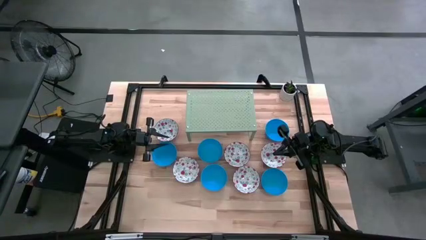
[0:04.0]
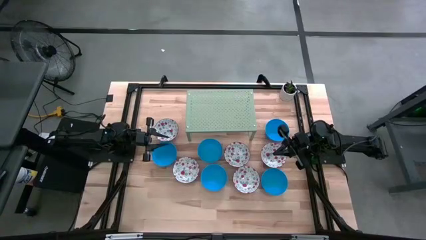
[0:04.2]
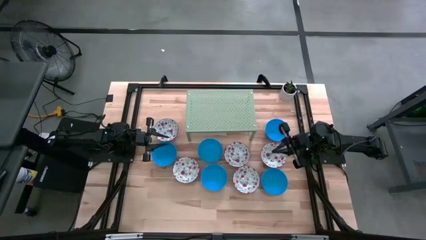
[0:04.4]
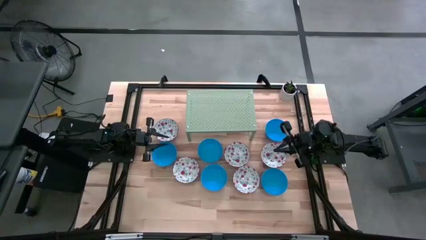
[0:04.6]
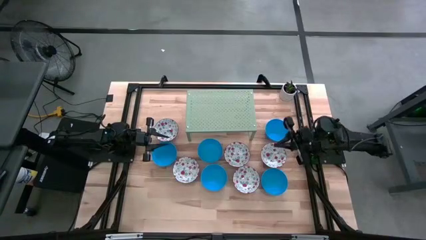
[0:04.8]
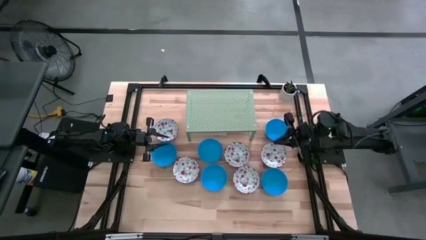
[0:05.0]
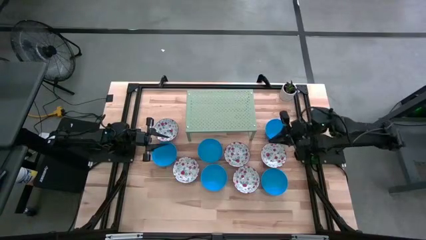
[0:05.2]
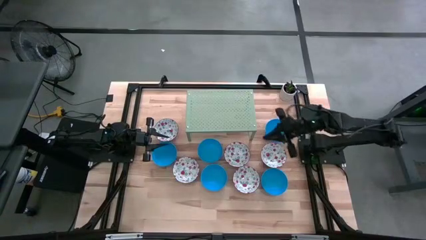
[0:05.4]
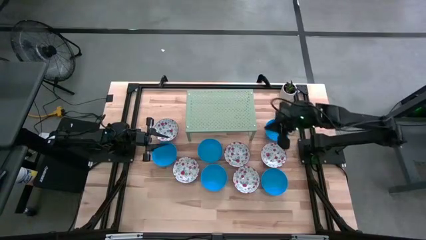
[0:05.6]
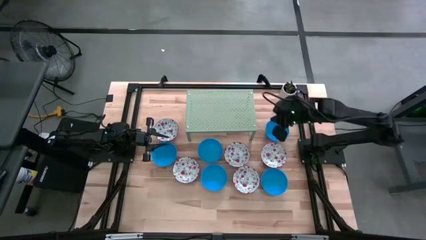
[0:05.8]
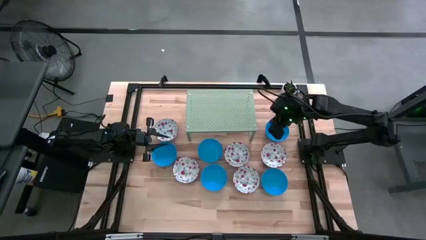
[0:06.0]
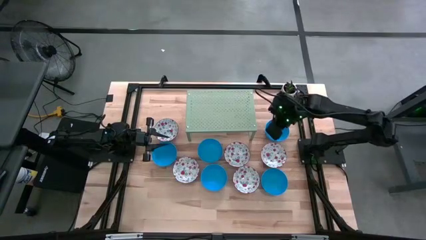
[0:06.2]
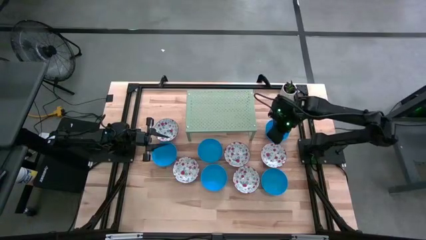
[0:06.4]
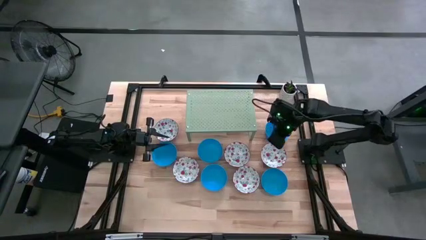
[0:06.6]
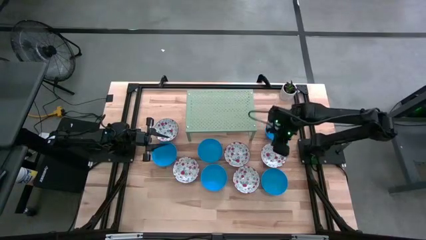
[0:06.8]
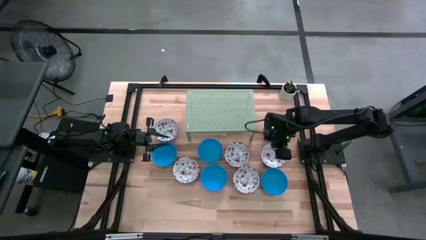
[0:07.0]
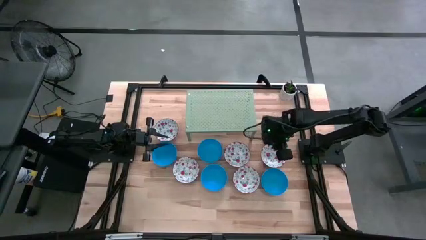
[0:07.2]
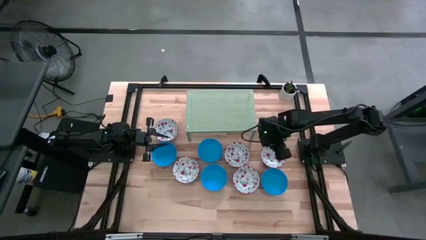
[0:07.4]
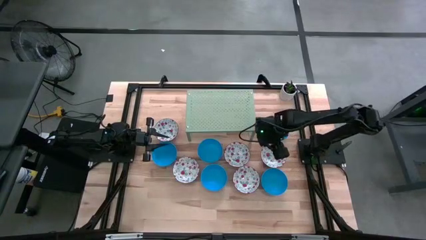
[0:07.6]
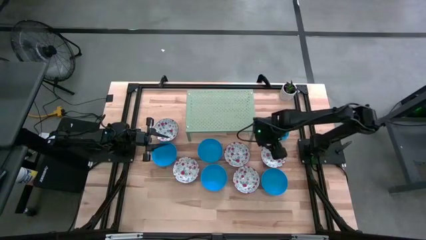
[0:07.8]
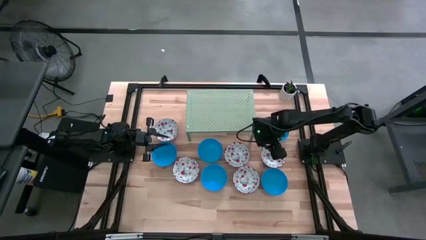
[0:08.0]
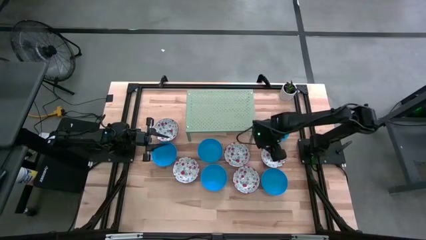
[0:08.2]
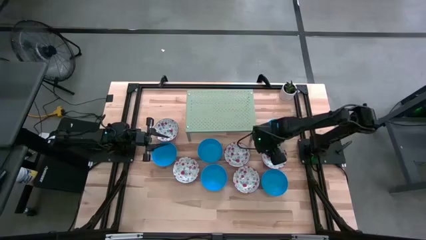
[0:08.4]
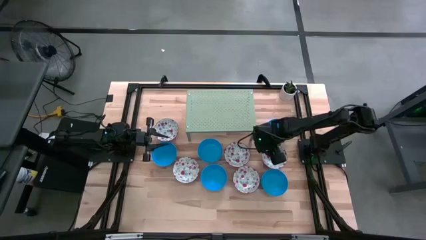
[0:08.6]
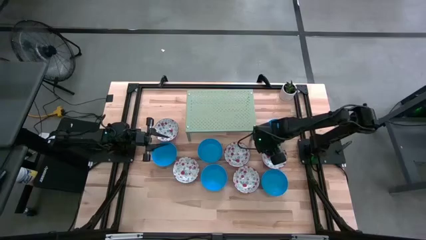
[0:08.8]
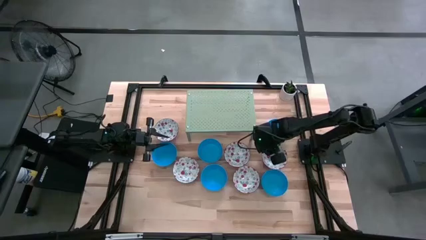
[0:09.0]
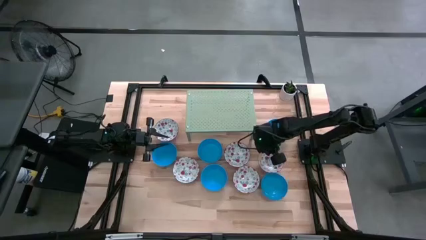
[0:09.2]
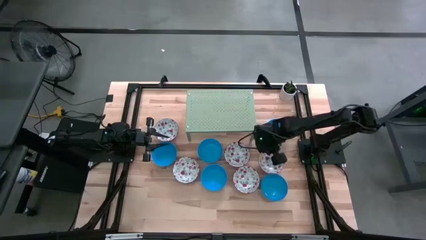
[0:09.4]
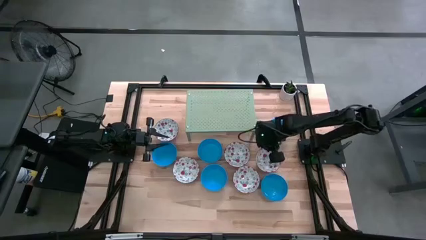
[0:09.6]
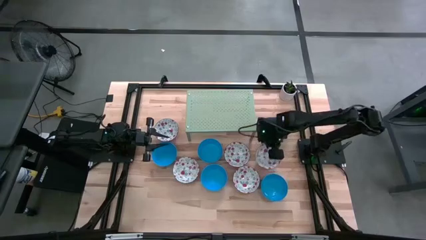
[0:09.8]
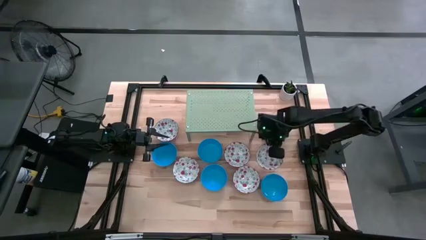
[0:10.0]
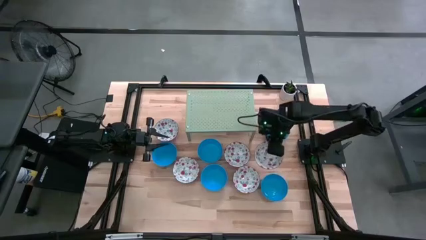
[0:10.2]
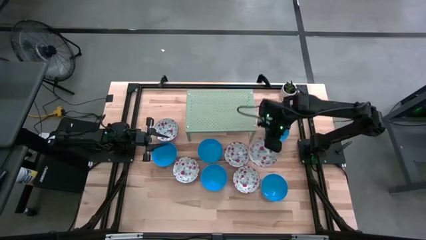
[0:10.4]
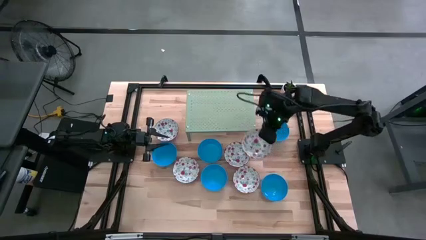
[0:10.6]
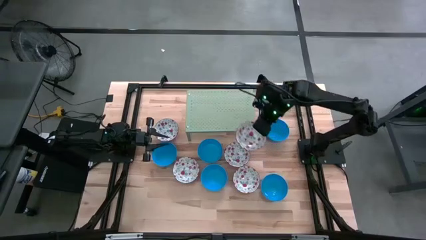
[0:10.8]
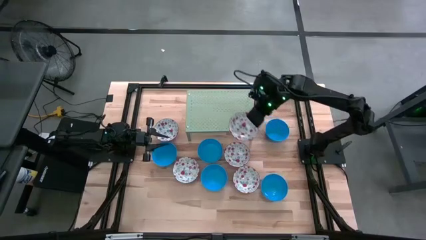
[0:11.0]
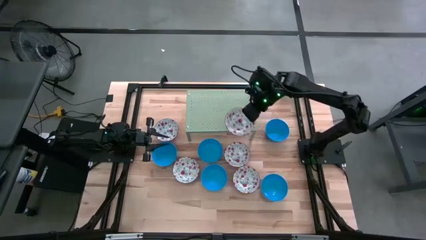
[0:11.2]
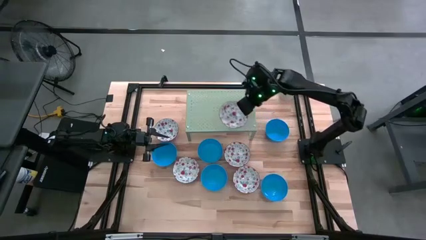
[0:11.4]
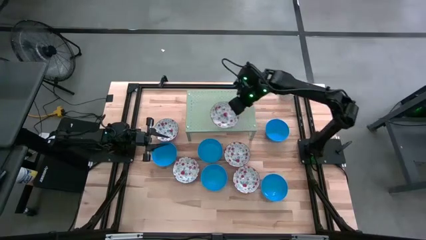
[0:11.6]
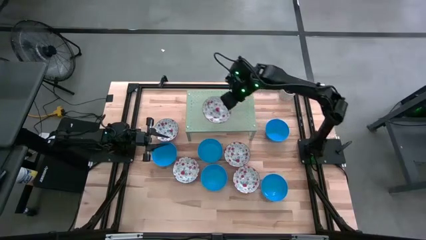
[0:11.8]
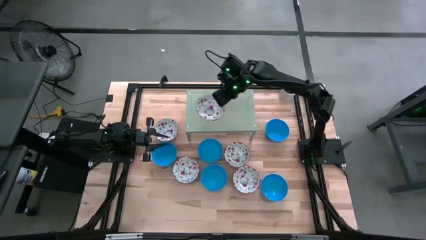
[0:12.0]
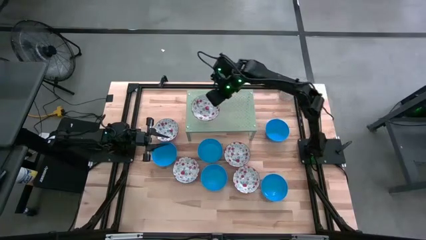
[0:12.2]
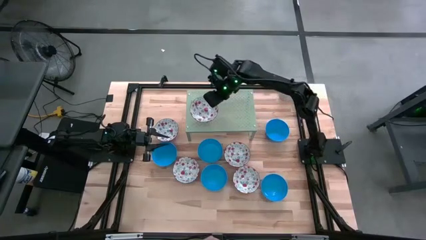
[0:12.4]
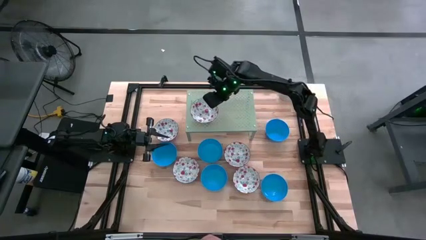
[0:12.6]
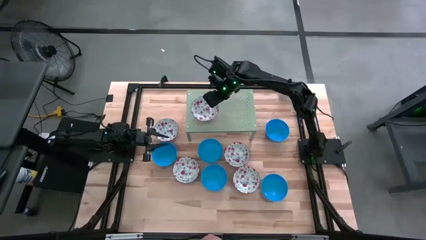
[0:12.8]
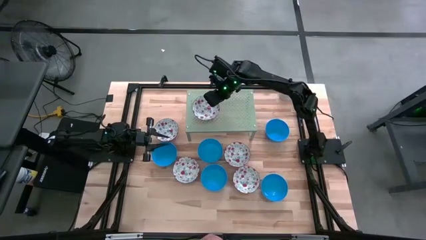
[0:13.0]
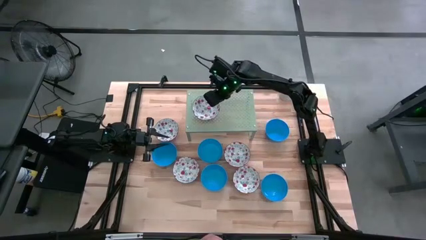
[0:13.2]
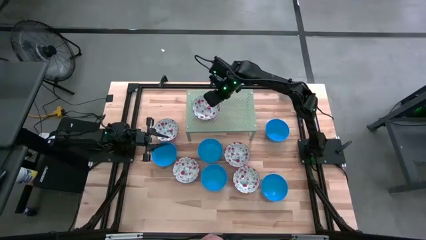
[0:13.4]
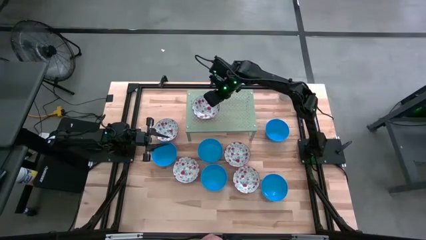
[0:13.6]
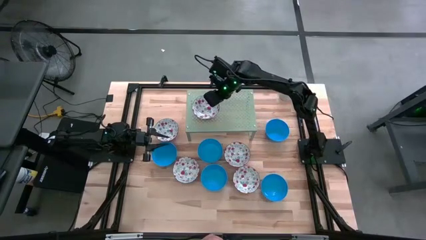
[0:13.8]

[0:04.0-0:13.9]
Task: Pick & Place Mini bowls
Put the red patterned bowl on the shelf

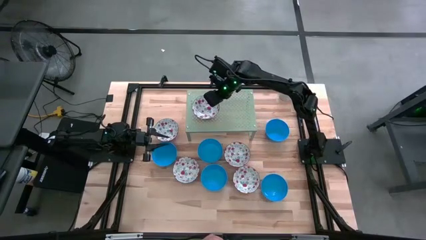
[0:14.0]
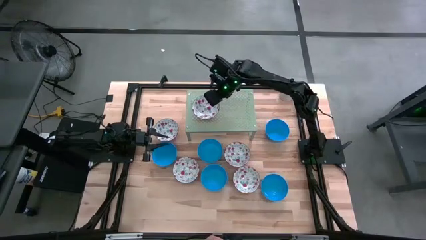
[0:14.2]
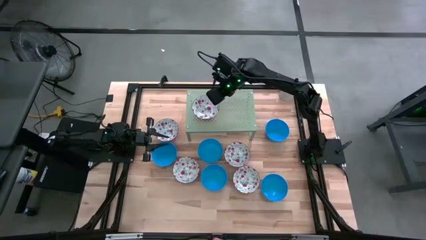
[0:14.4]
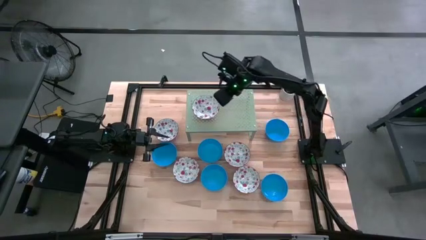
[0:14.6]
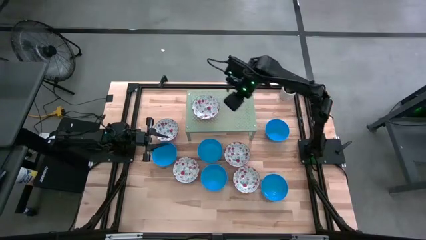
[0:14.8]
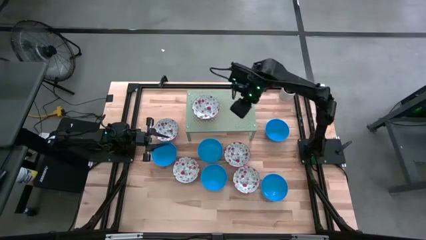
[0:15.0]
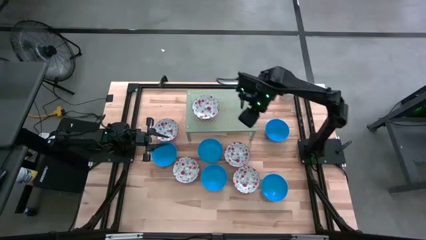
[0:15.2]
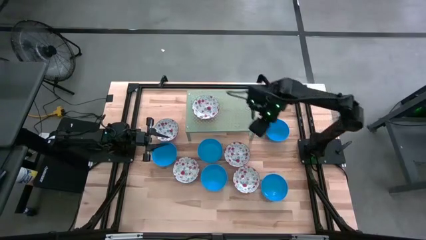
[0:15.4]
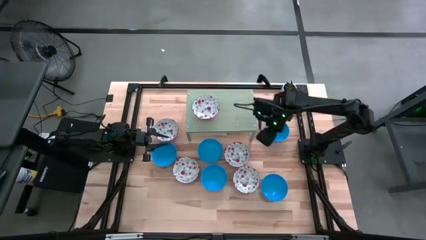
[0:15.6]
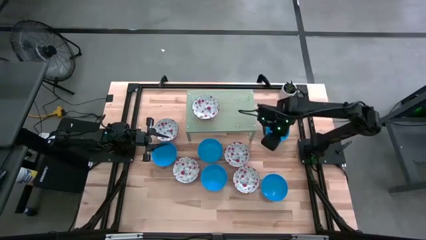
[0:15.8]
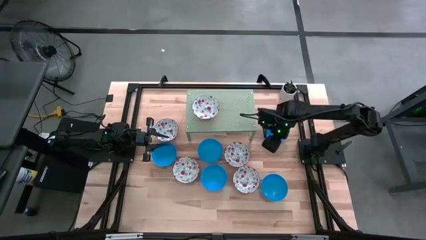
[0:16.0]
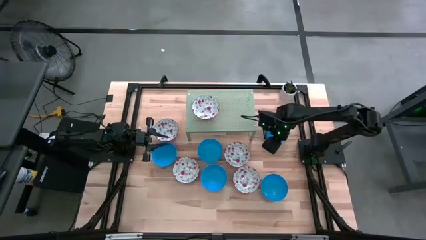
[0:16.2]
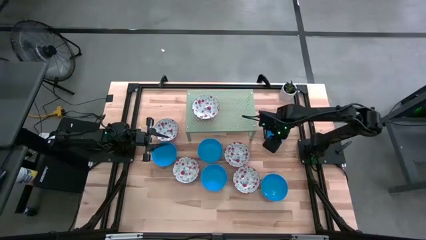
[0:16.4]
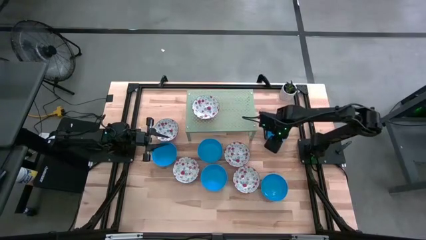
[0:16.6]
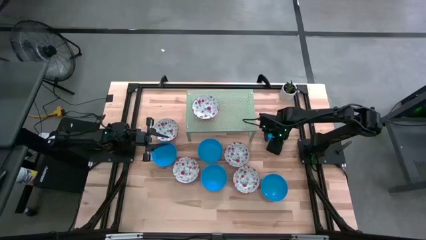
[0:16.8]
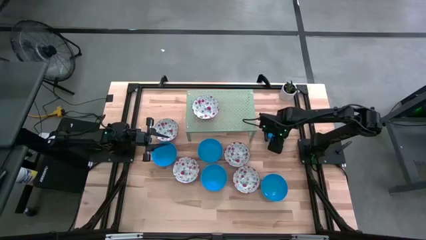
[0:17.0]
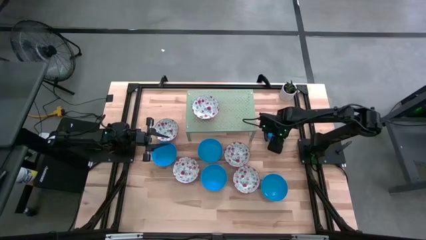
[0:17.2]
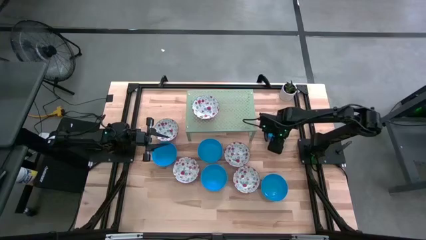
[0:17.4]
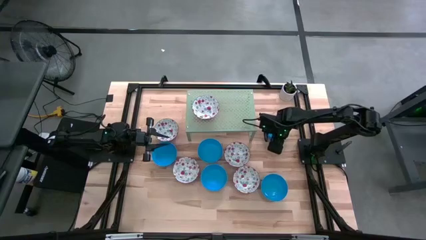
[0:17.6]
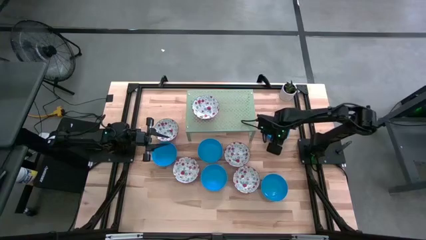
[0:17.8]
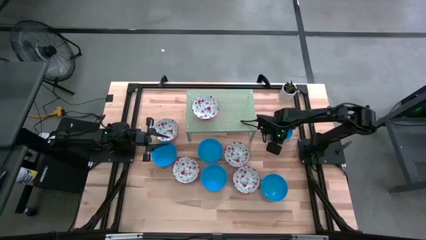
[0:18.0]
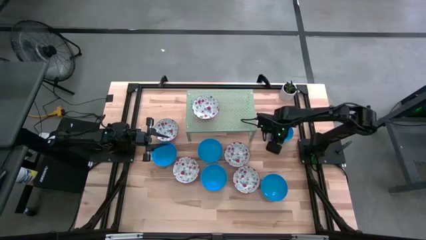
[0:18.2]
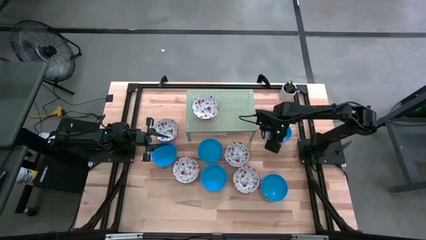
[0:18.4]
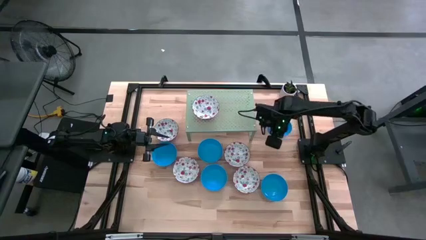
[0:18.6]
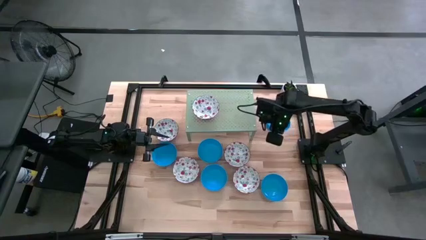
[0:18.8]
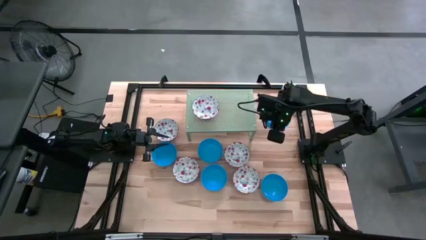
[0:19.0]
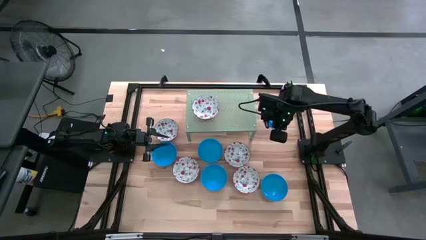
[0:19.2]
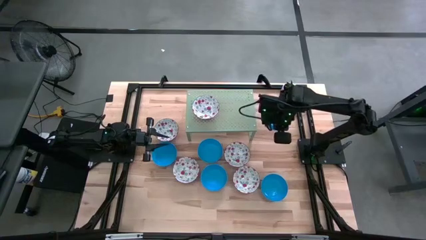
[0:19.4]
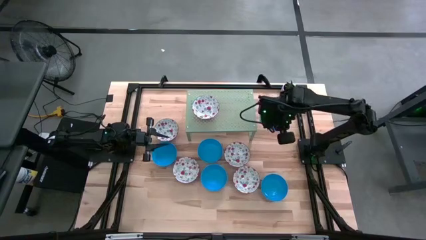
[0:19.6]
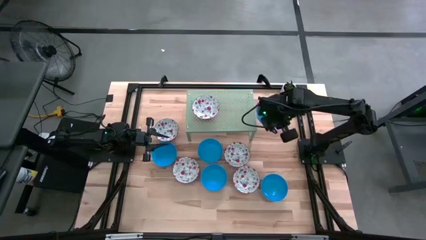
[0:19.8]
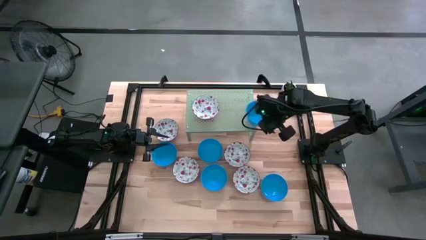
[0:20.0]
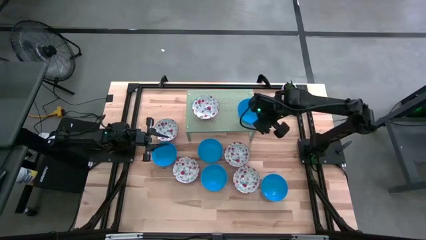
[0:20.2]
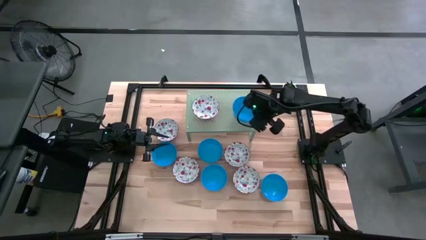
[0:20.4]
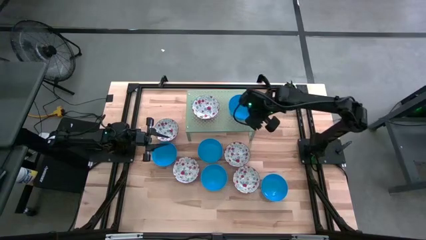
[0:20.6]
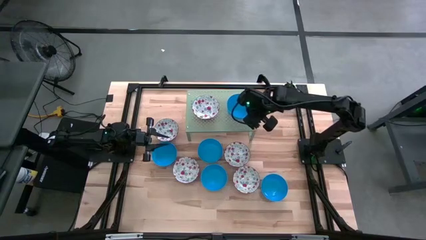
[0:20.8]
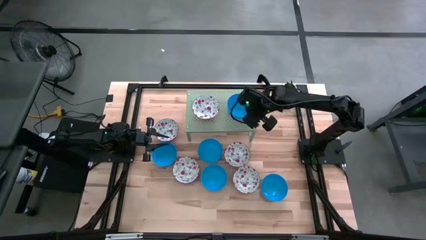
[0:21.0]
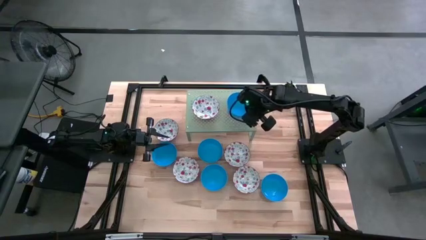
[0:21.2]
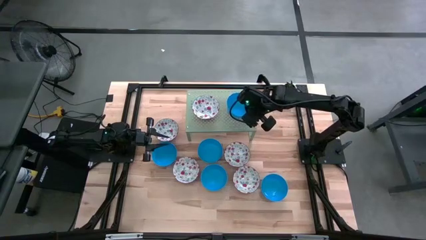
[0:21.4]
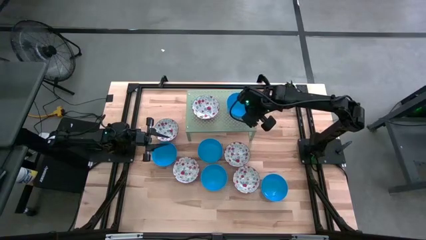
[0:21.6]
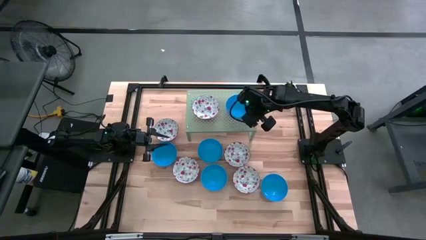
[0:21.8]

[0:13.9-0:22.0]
Put the light blue bowl on the shelf
